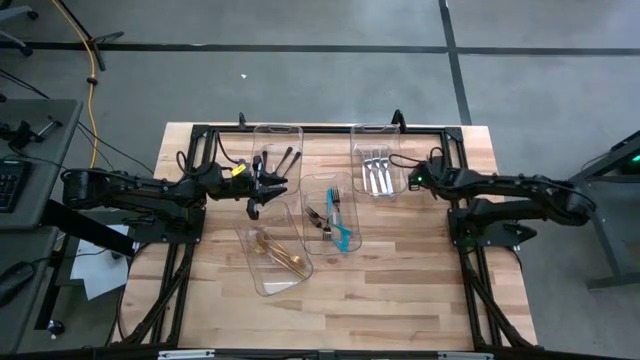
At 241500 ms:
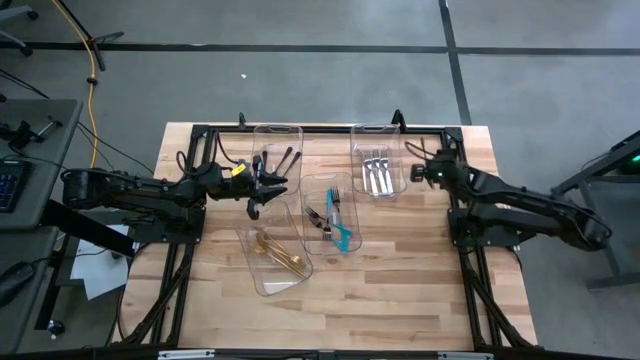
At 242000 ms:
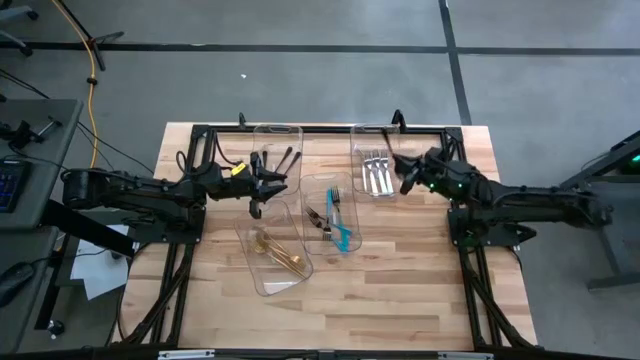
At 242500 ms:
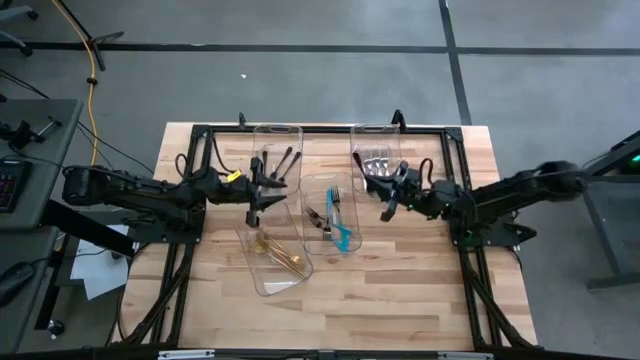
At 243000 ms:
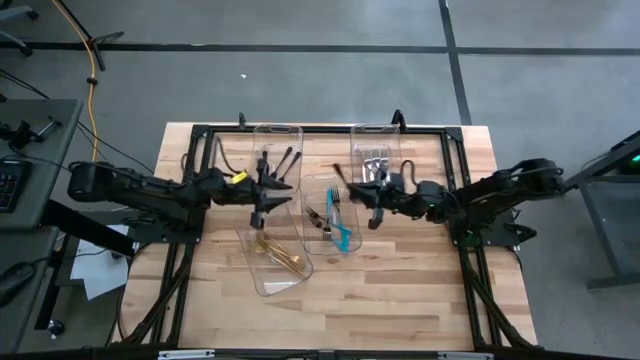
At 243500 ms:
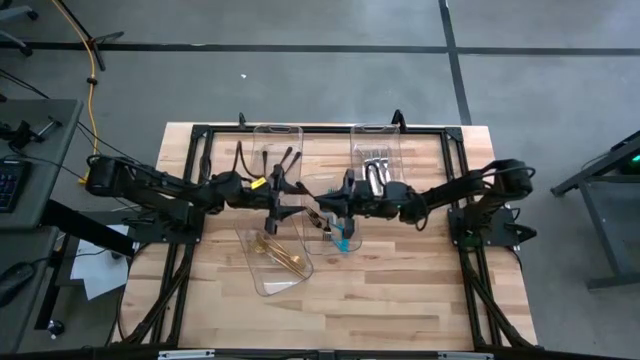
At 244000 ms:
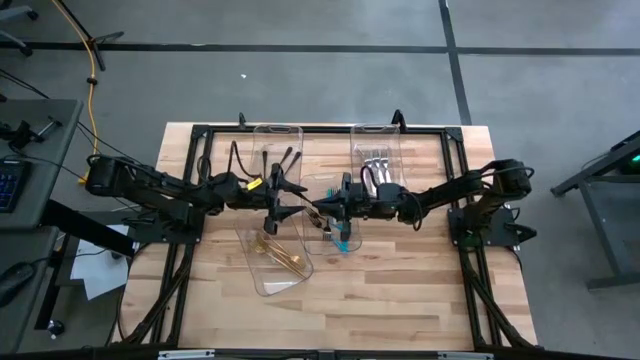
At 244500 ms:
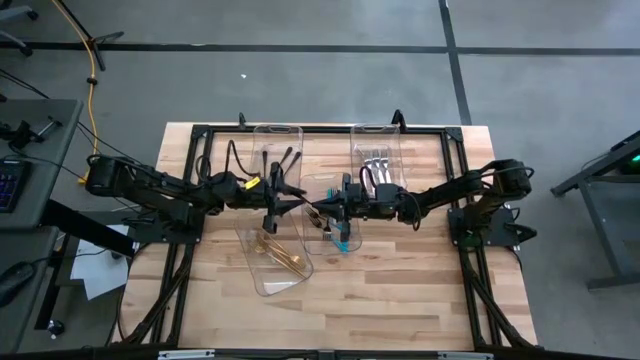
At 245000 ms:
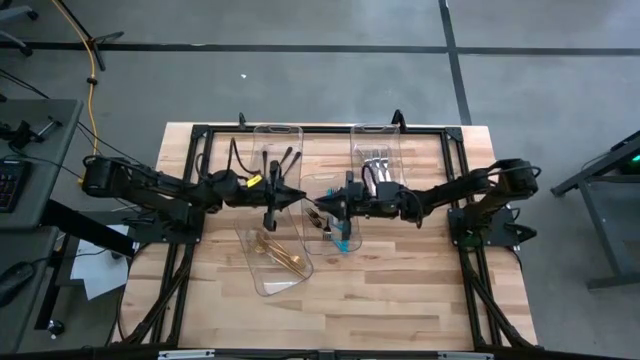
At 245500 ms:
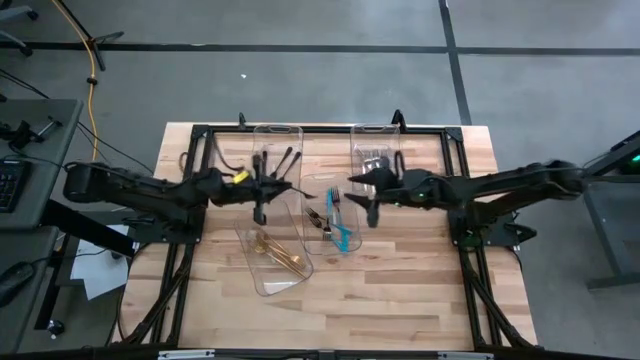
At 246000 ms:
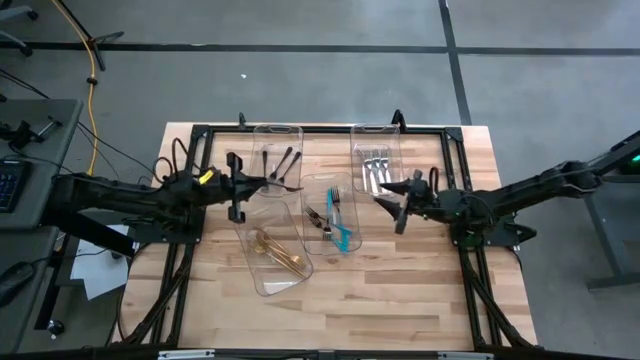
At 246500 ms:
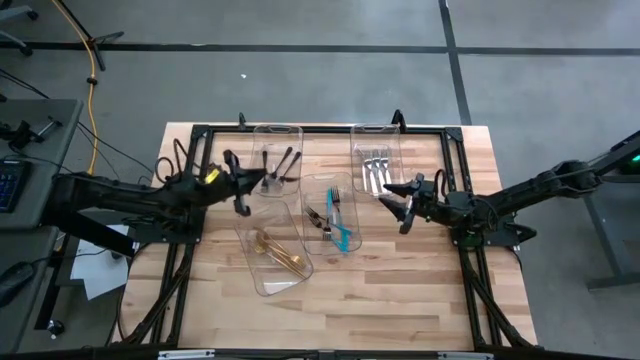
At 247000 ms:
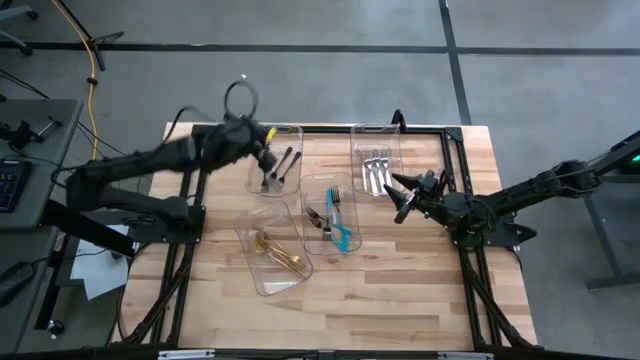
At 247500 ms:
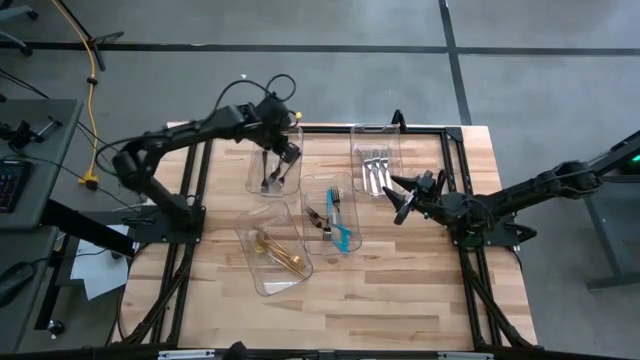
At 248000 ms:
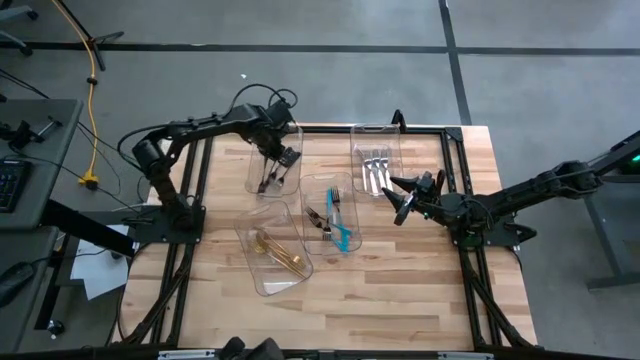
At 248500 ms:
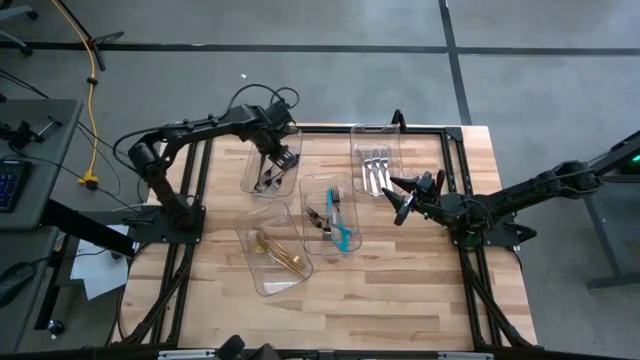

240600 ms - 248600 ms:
Task: Sort silverware by color (type)
Put the black fork into the top left transparent bin

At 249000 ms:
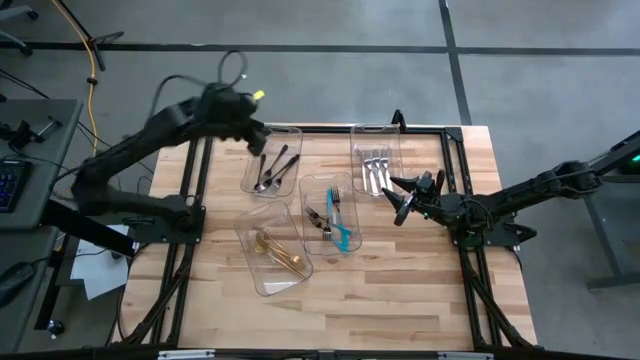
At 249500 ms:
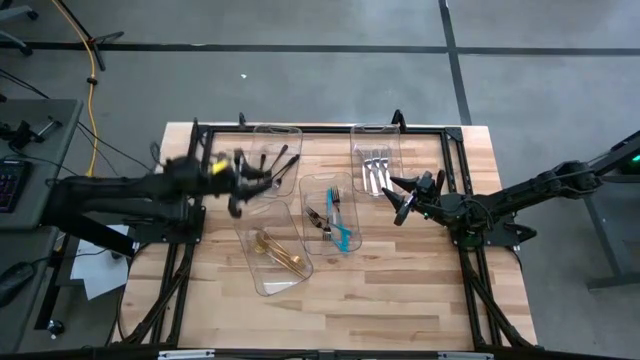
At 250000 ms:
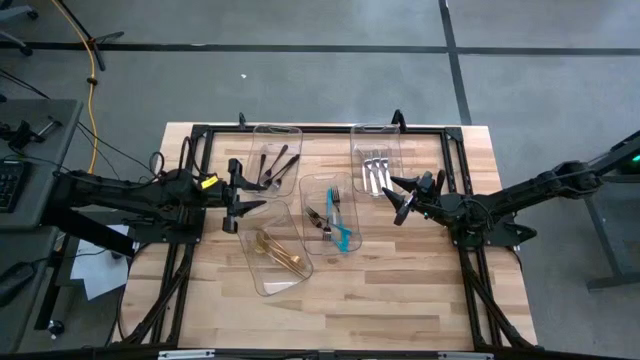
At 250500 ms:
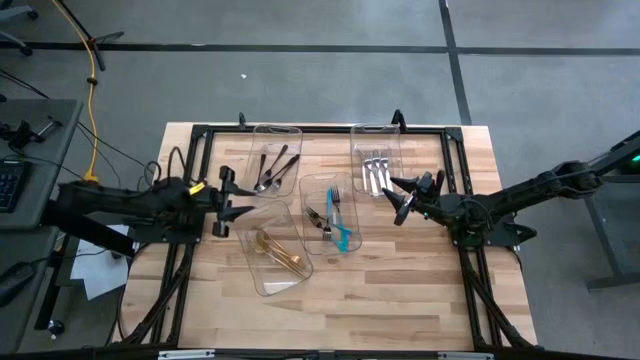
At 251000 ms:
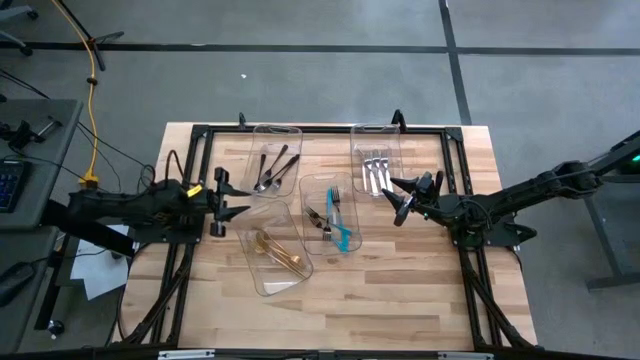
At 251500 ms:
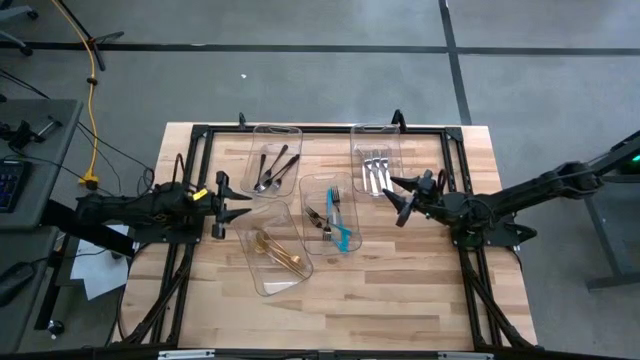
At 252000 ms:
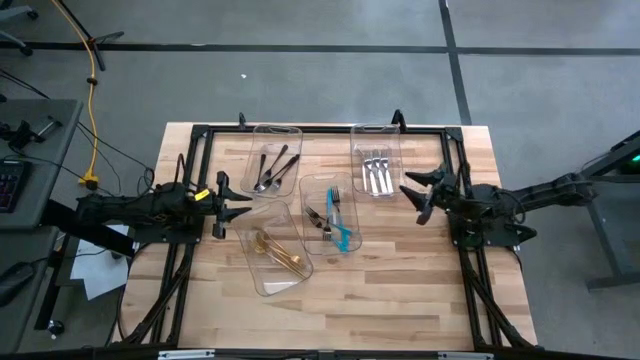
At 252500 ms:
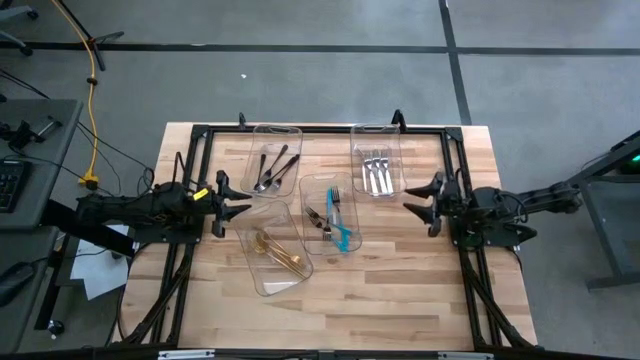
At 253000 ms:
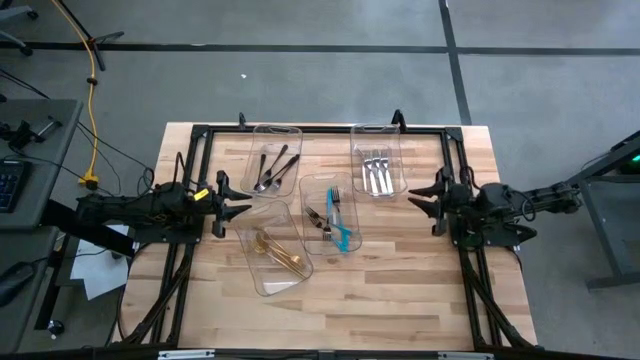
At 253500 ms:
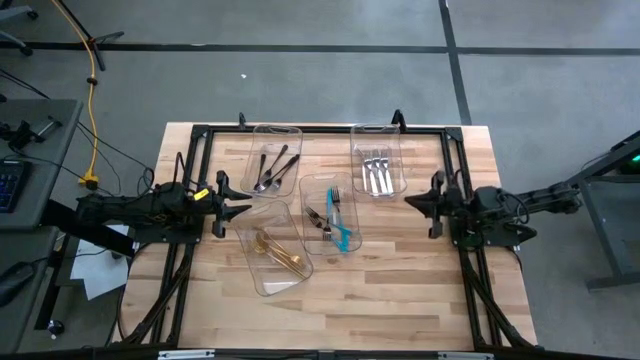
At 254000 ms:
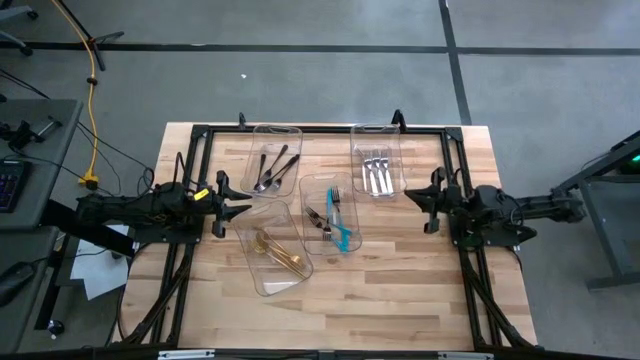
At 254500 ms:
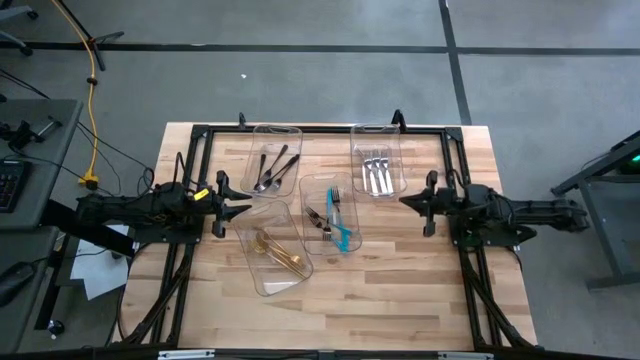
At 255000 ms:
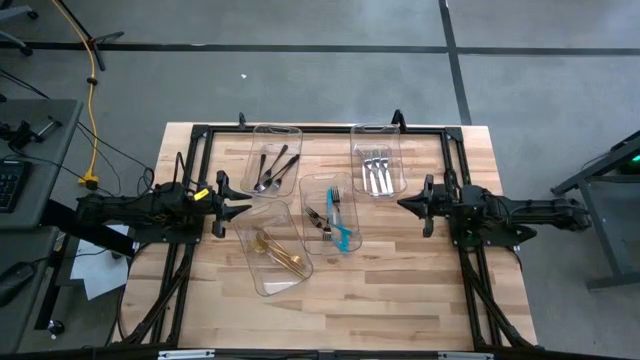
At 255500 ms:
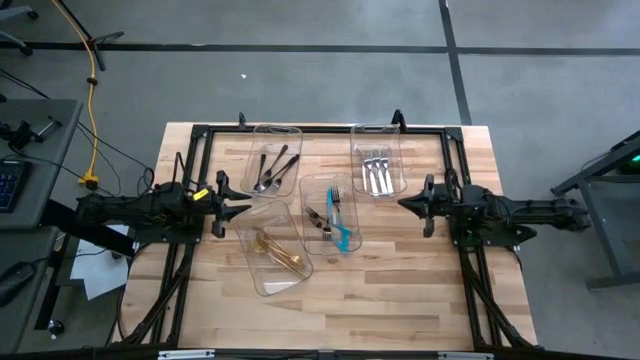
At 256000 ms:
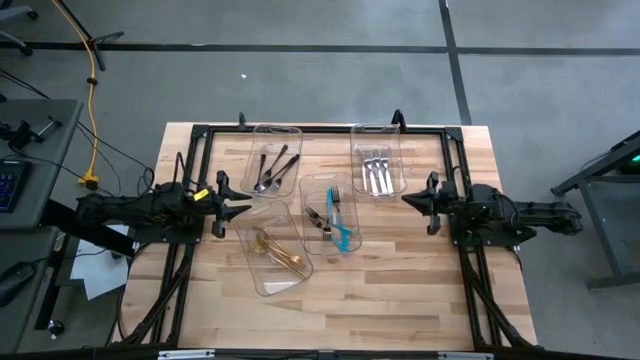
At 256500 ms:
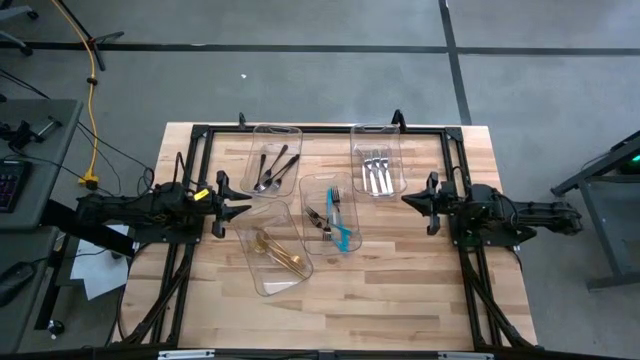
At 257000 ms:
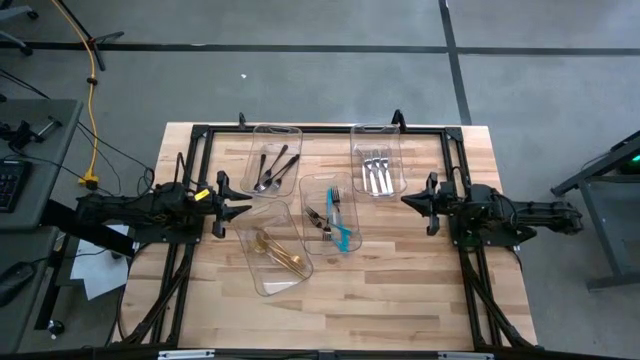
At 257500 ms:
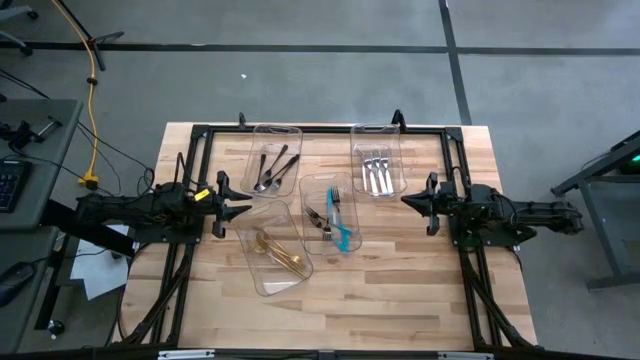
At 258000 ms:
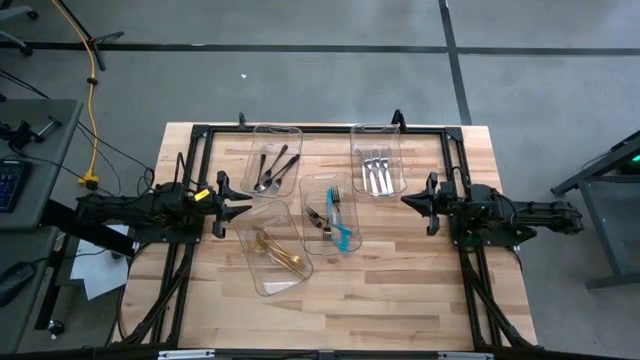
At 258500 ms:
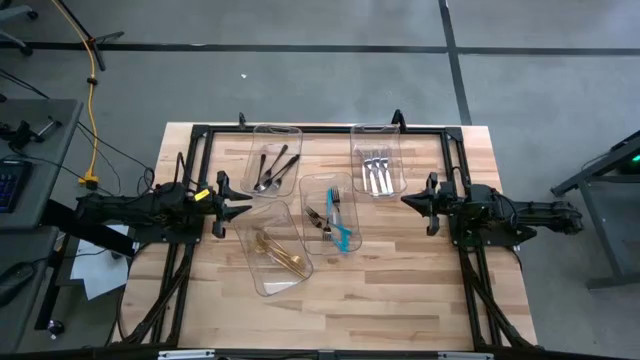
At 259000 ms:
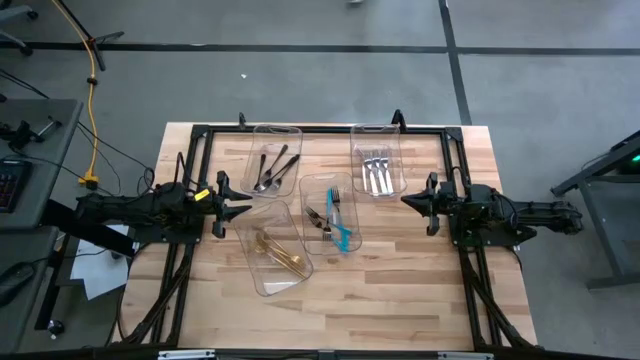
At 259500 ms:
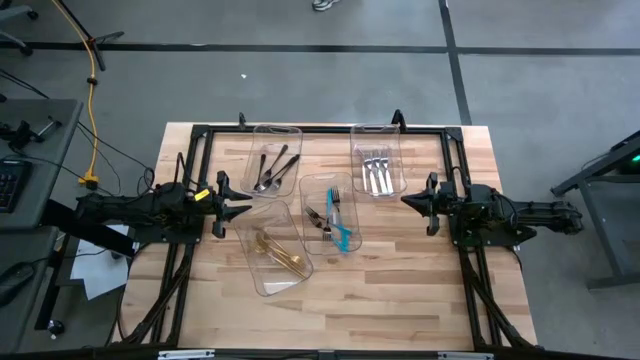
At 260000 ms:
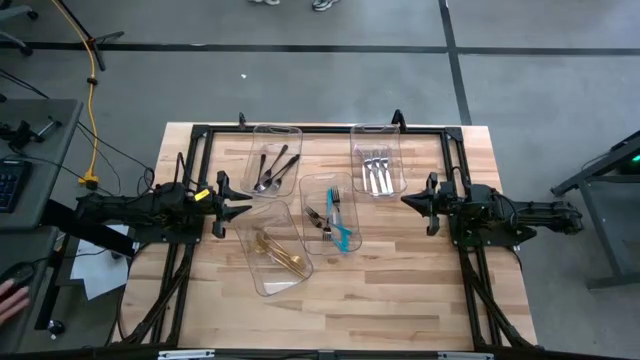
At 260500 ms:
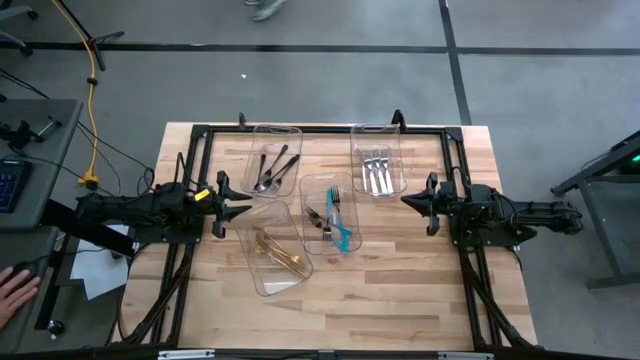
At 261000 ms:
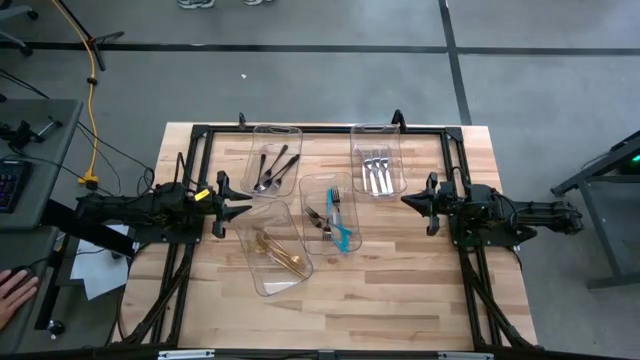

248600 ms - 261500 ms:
Return to Home Position
